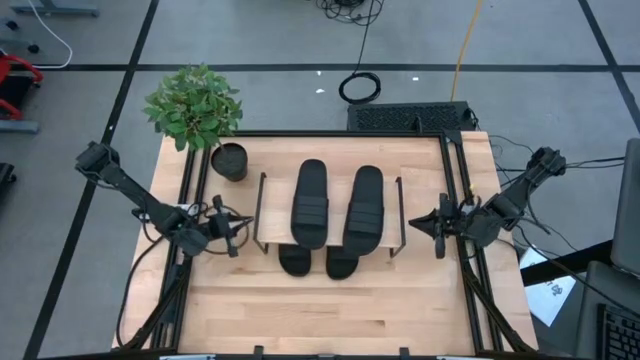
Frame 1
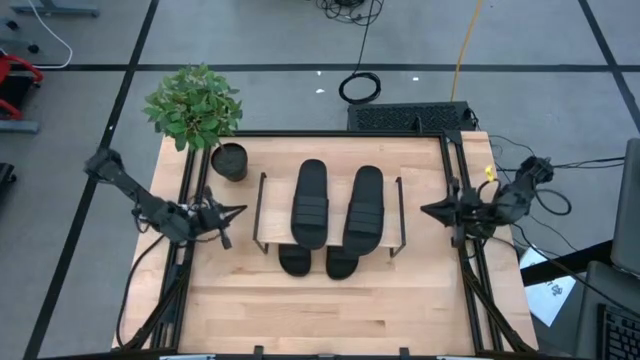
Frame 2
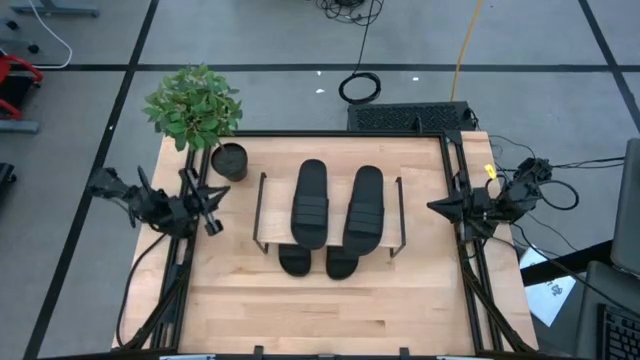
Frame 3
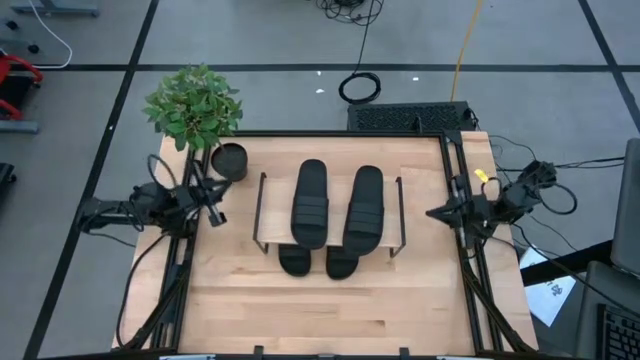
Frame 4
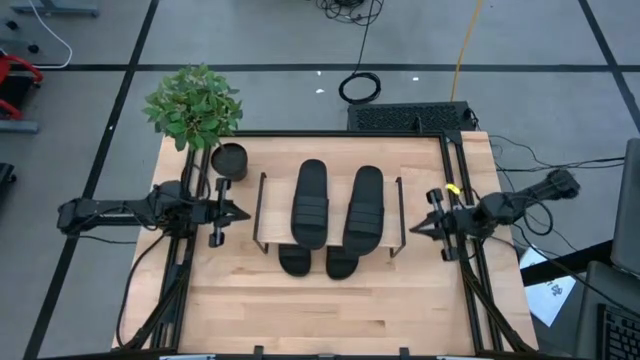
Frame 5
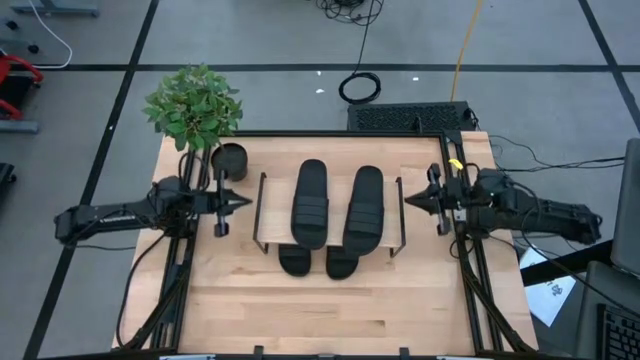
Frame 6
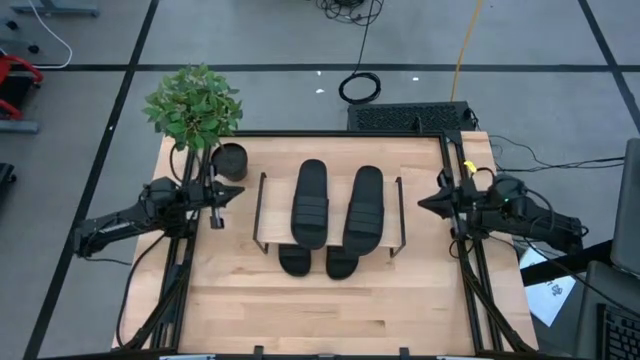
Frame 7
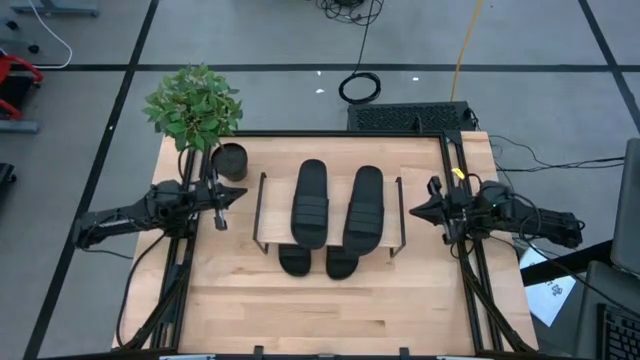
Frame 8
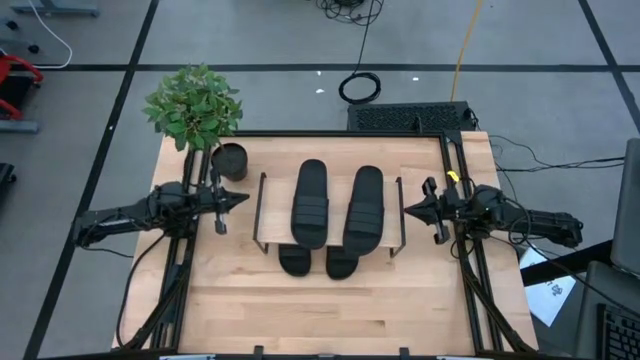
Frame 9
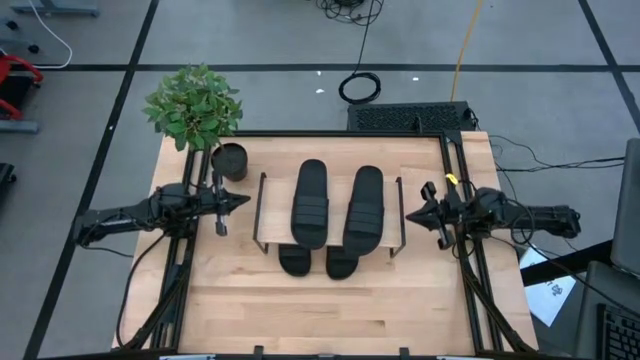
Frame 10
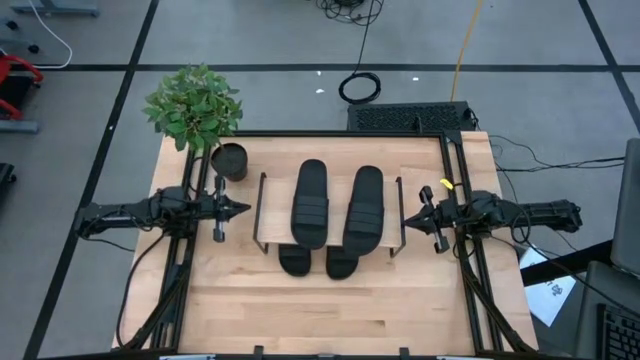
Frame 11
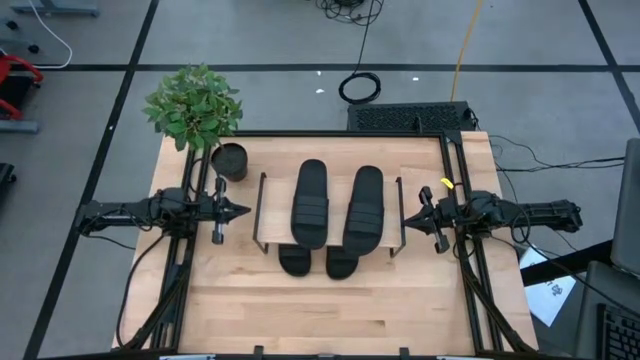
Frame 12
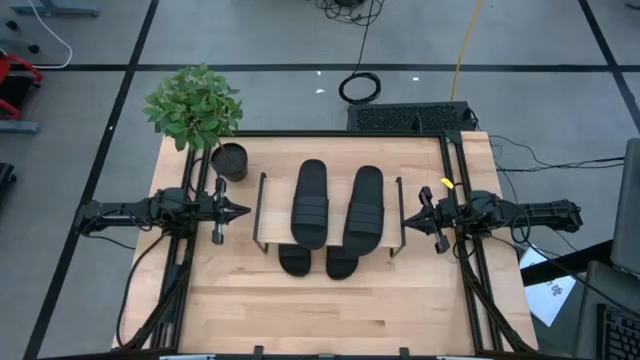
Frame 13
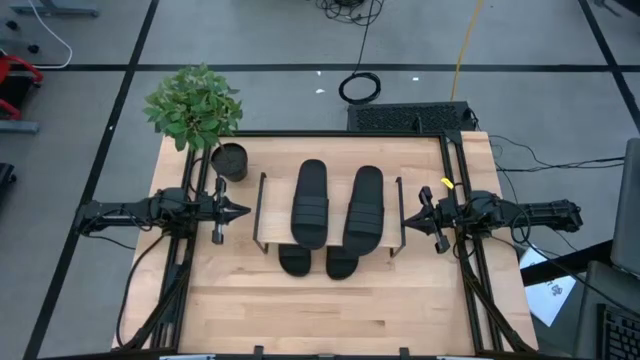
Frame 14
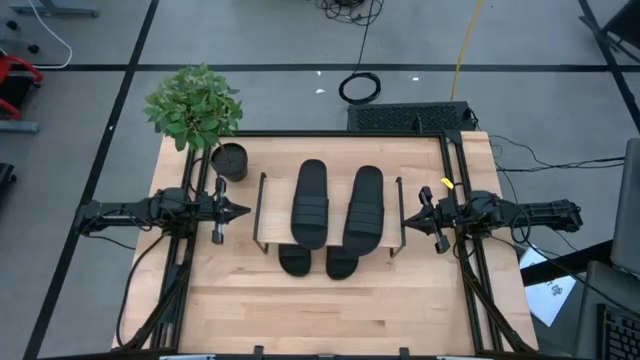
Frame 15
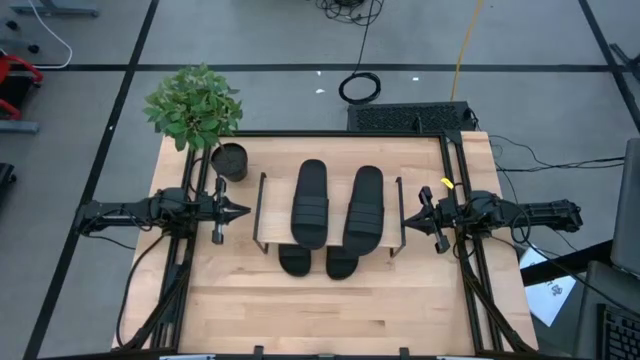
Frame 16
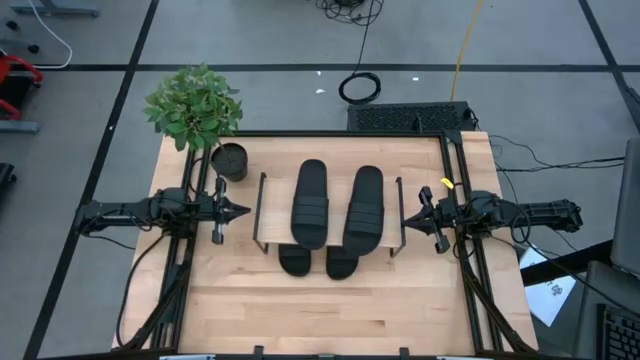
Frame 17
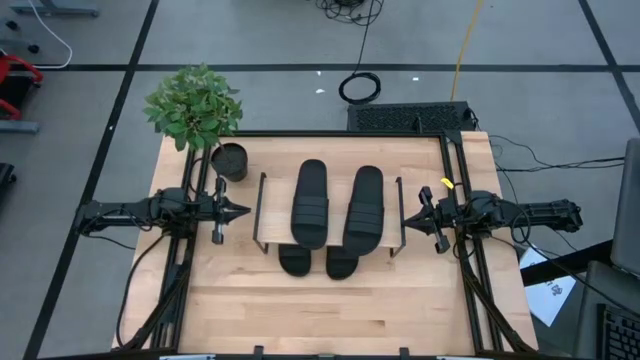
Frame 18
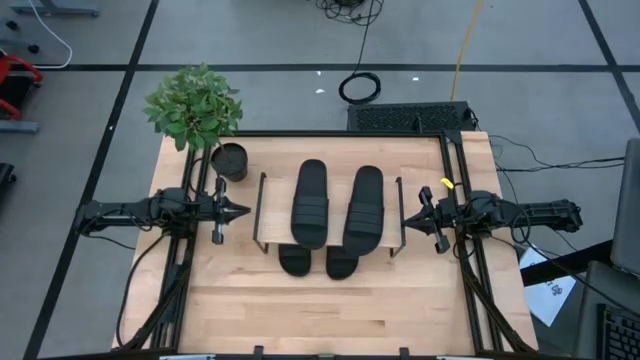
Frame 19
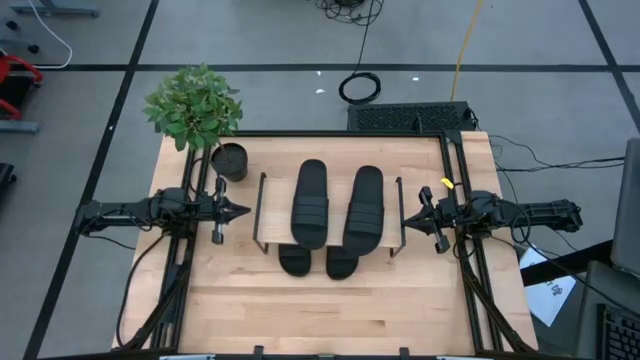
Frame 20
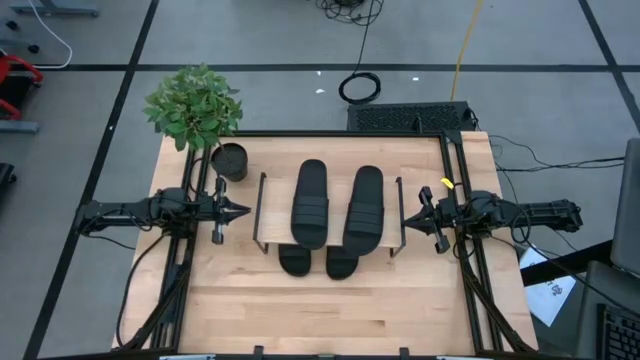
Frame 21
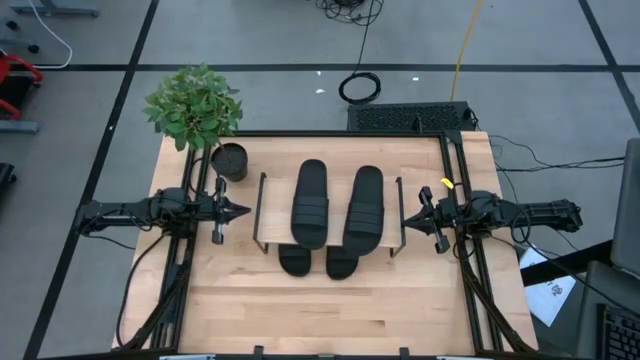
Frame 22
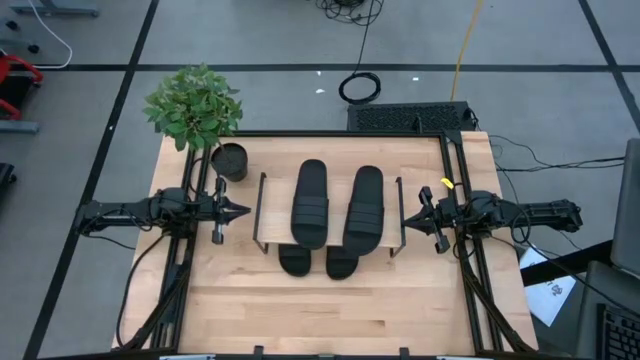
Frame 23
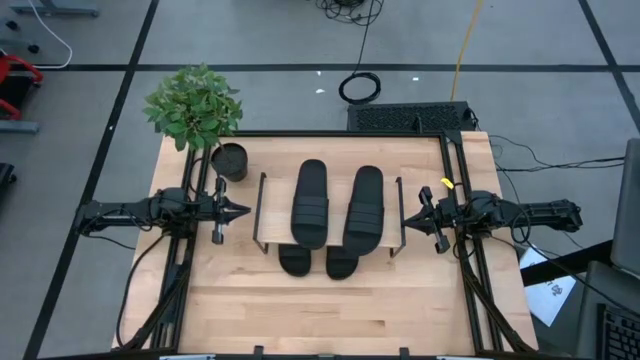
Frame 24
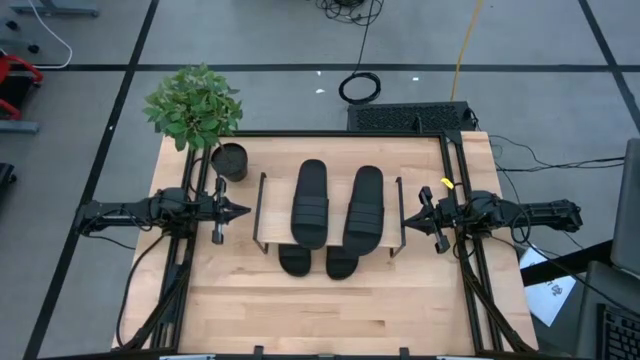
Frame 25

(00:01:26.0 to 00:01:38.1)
Task: Pick and place slides into the shelf
Return to Home Position

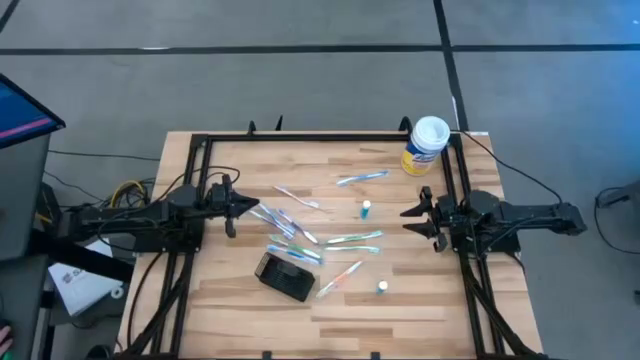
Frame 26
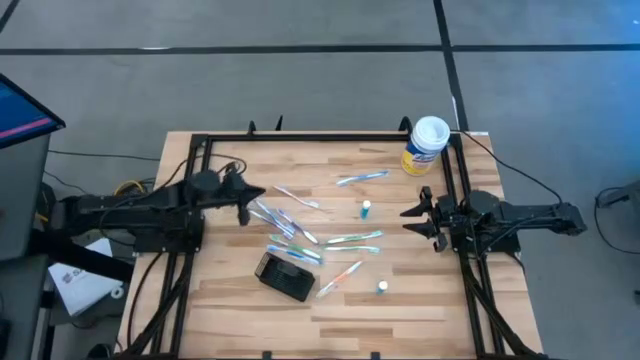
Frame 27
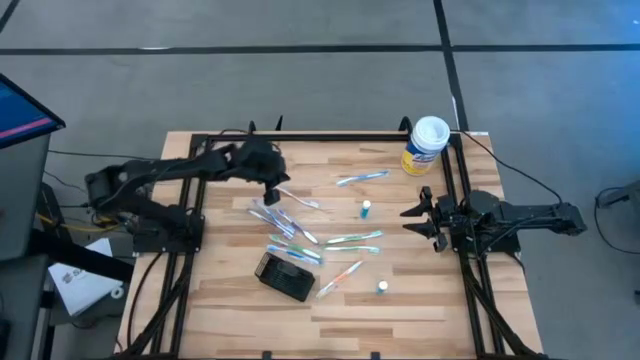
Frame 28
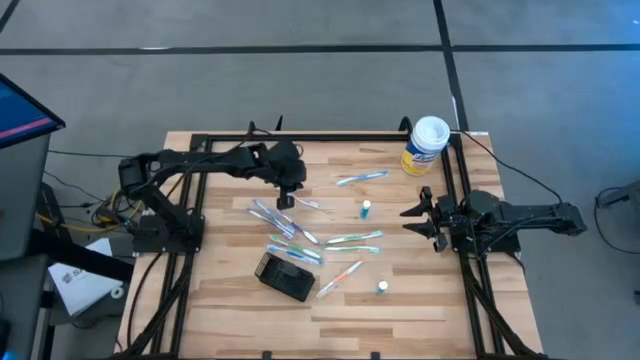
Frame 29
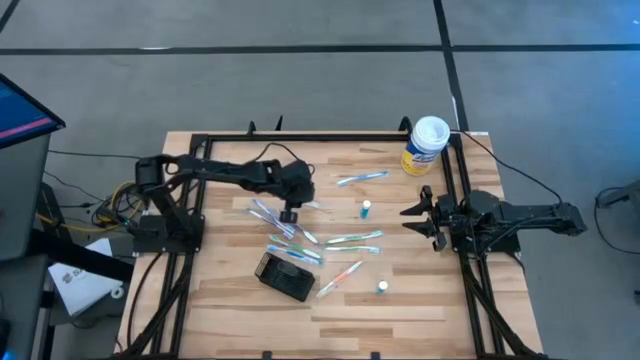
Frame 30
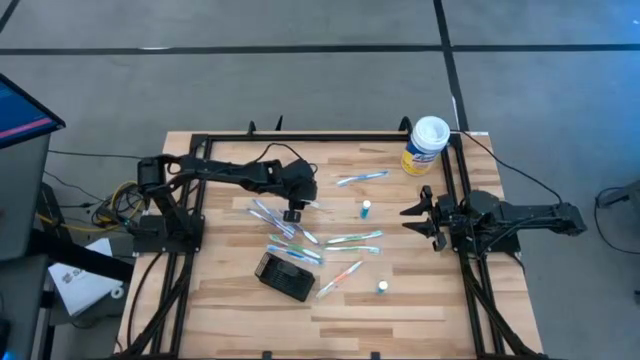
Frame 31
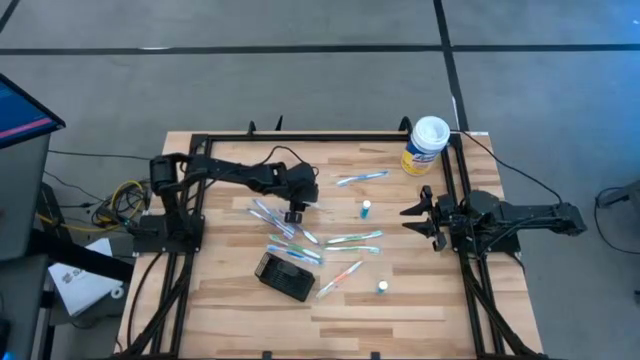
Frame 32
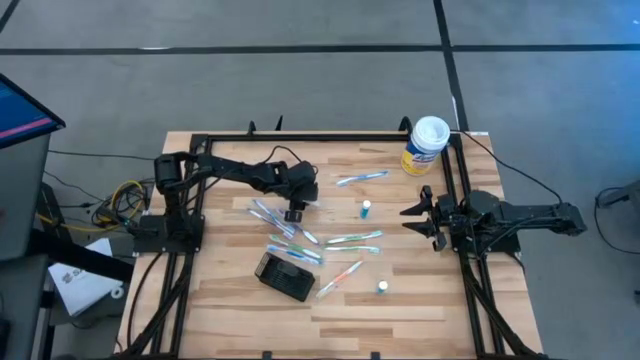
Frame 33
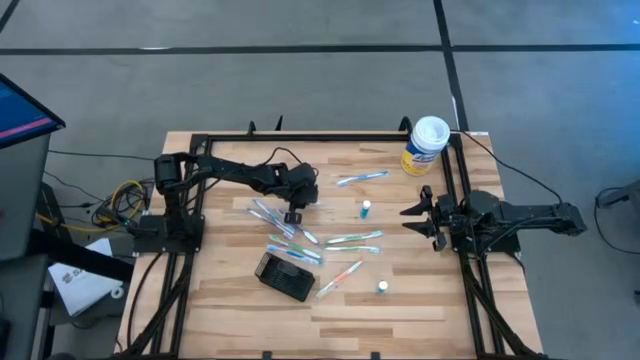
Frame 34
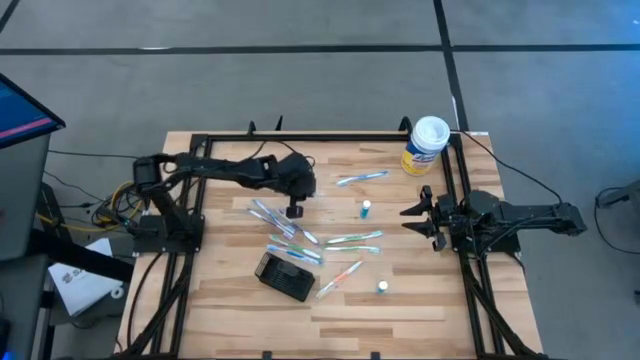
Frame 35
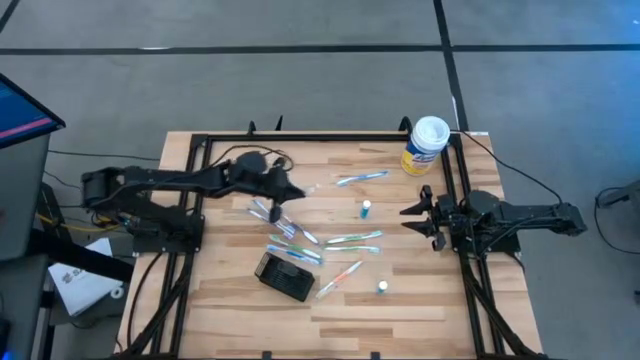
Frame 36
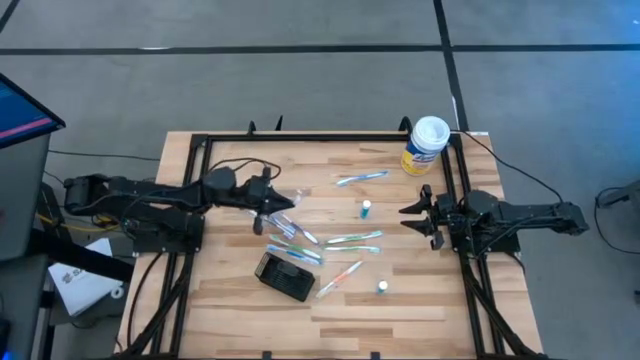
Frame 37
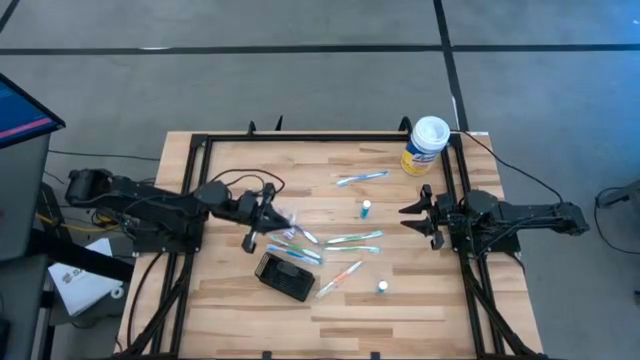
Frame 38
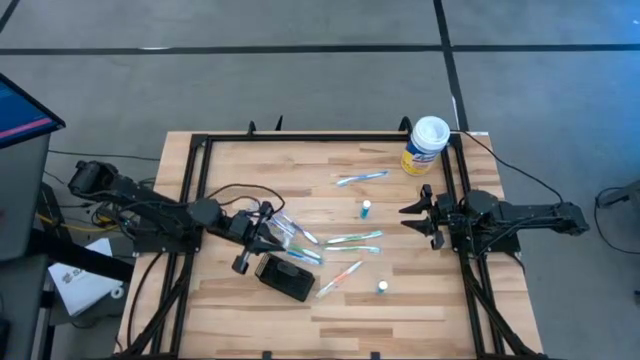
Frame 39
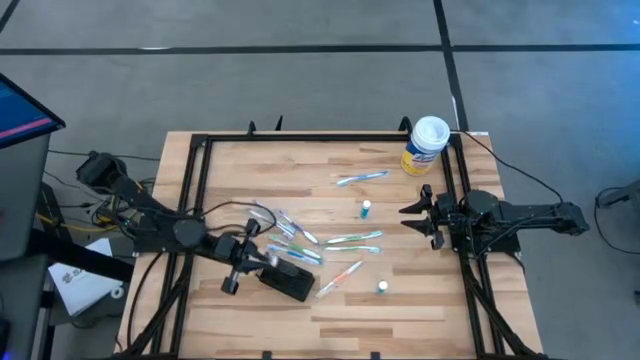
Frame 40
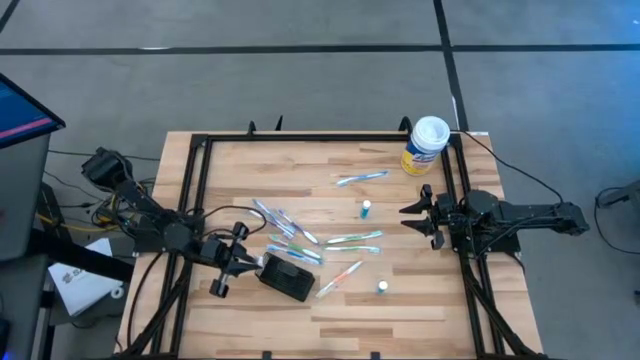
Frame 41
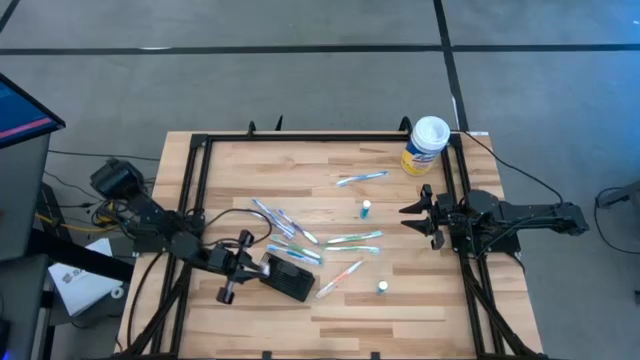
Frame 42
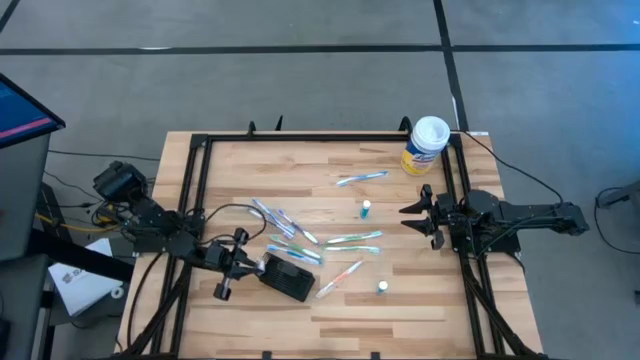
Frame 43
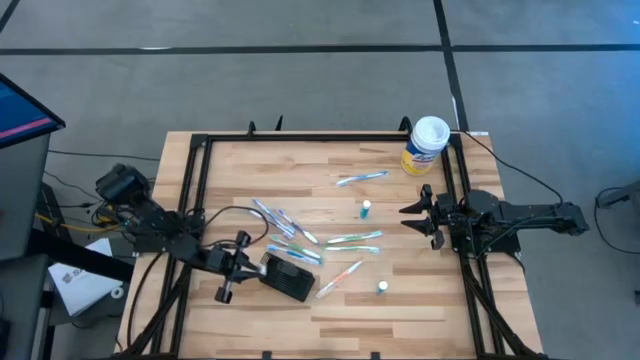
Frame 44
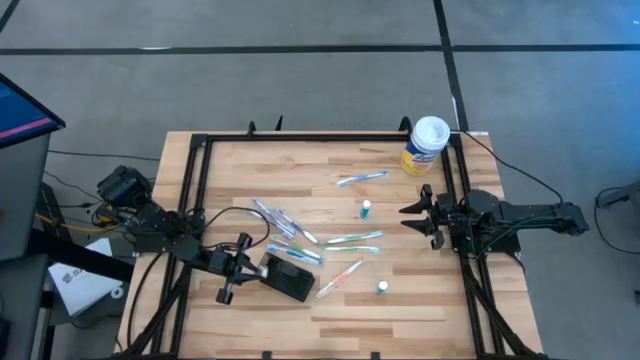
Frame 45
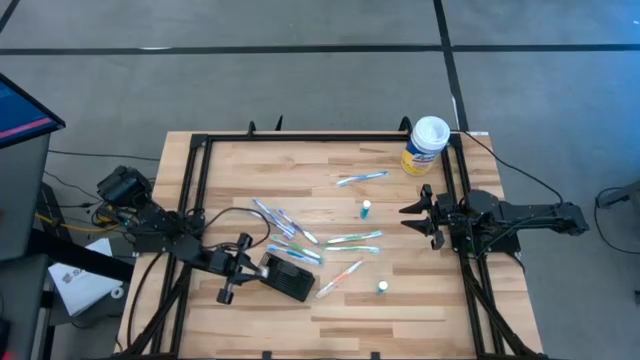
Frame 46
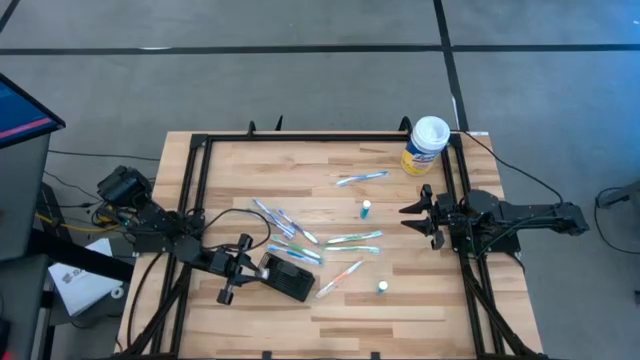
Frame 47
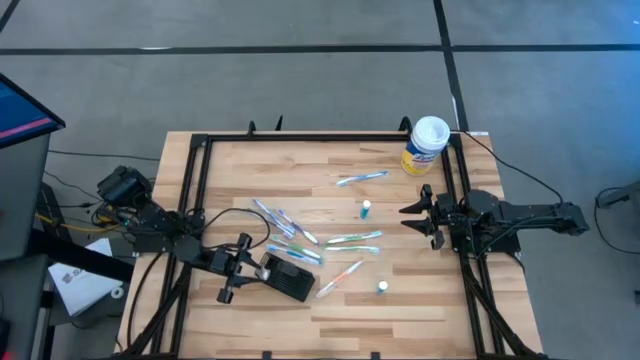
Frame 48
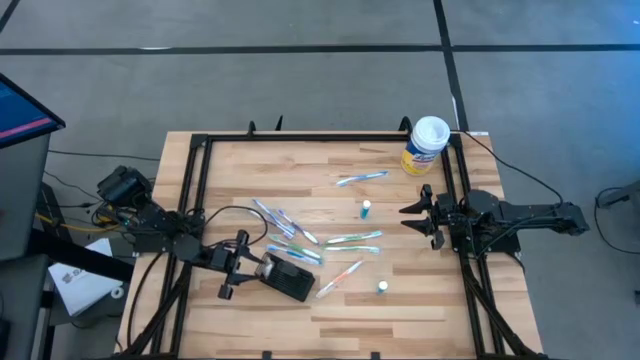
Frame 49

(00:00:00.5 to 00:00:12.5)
Task: Pick & Place toothbrushing station
Put the orange toothbrush into the mesh organizer
